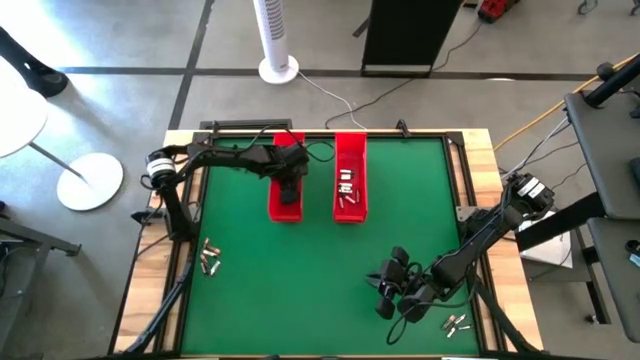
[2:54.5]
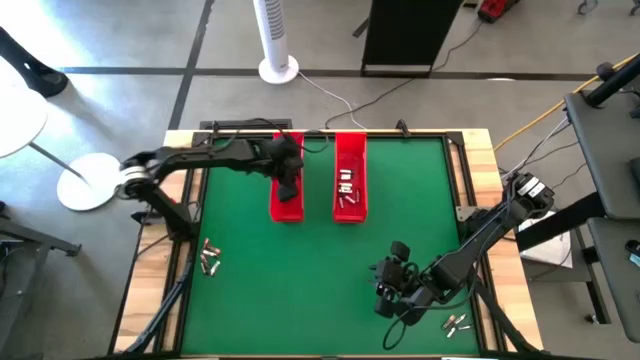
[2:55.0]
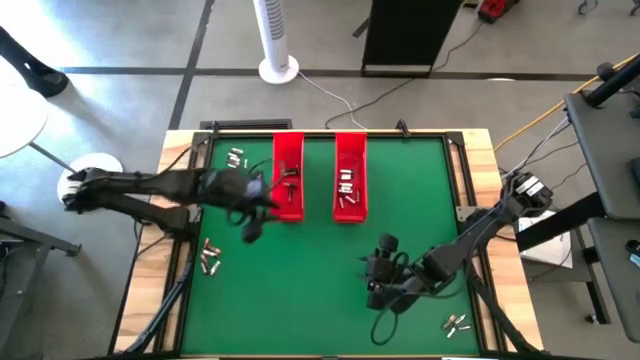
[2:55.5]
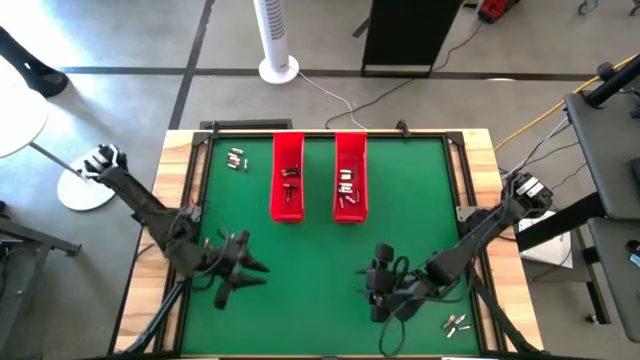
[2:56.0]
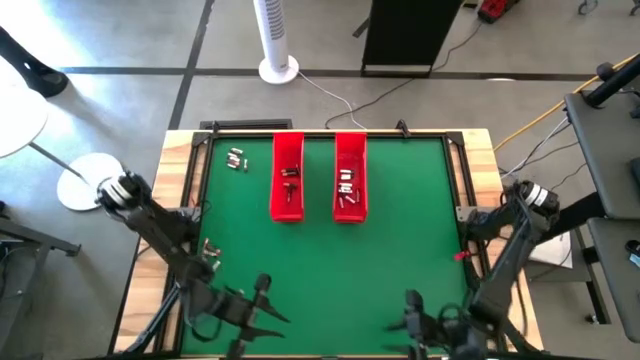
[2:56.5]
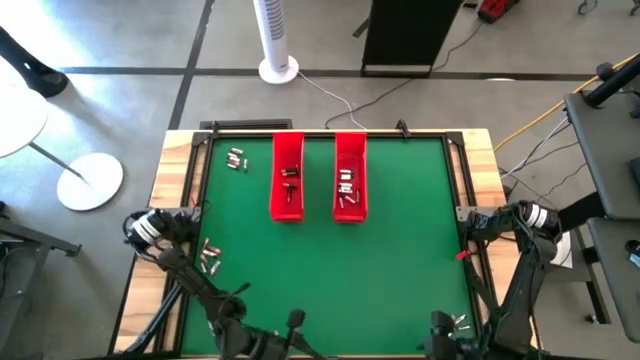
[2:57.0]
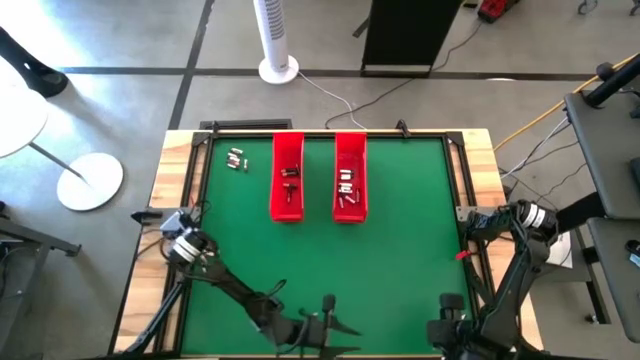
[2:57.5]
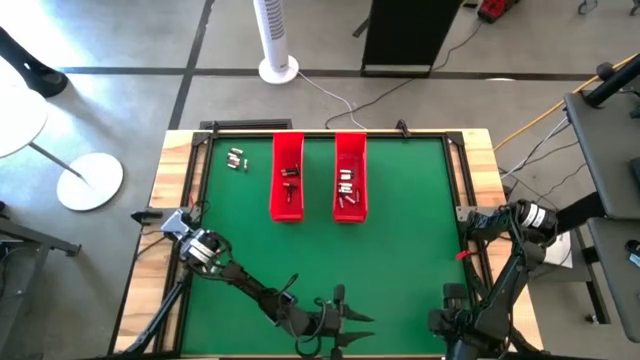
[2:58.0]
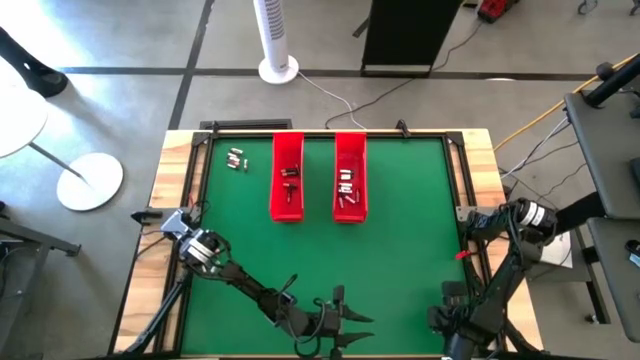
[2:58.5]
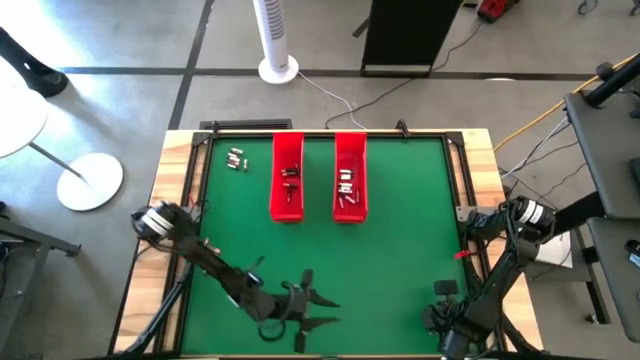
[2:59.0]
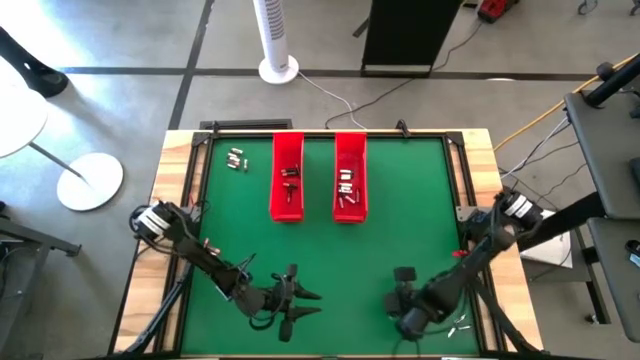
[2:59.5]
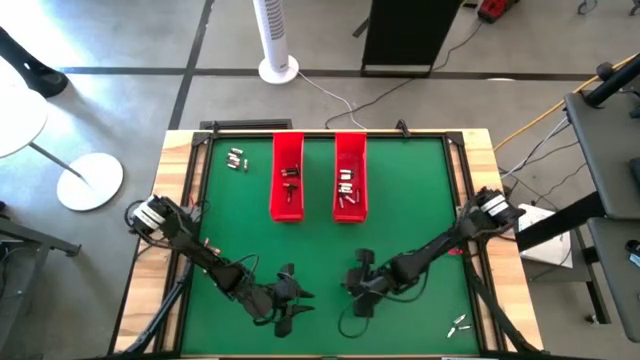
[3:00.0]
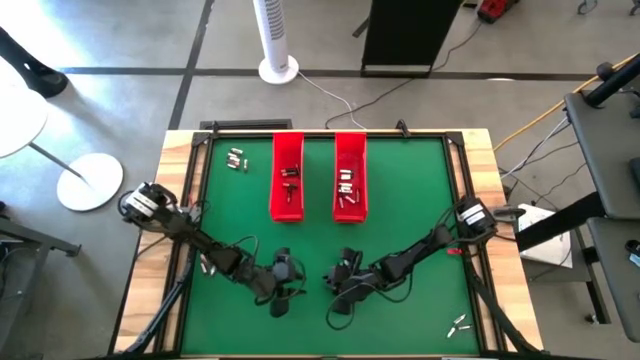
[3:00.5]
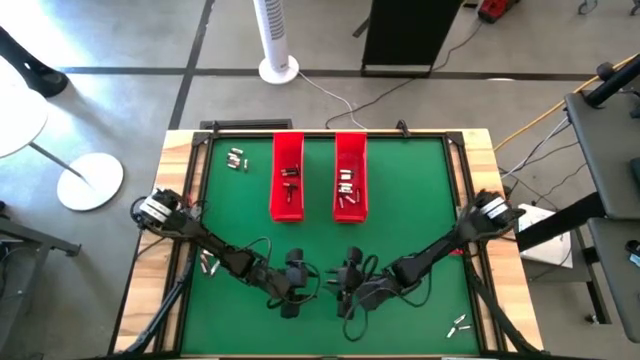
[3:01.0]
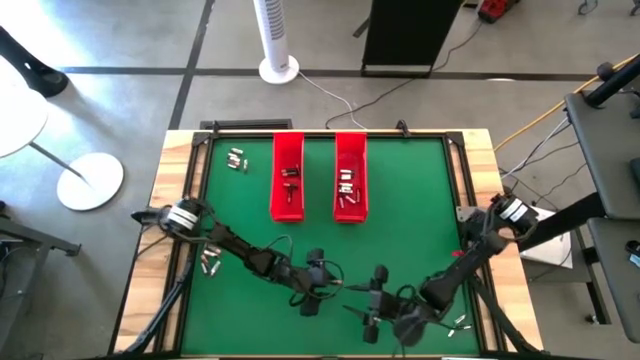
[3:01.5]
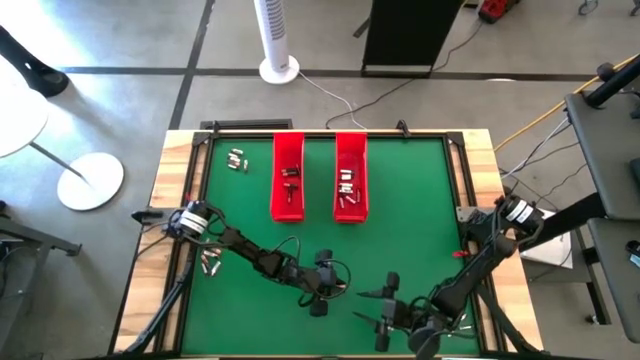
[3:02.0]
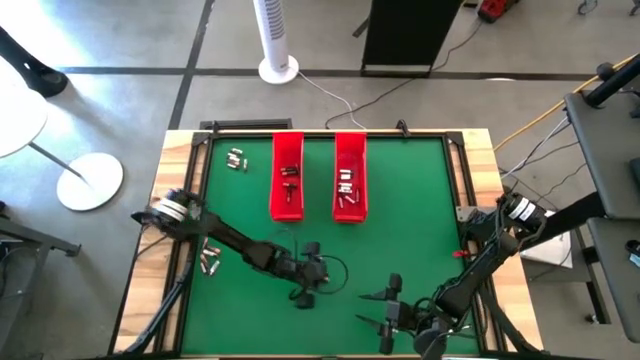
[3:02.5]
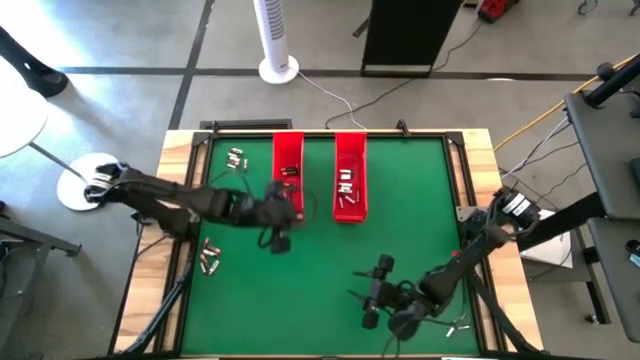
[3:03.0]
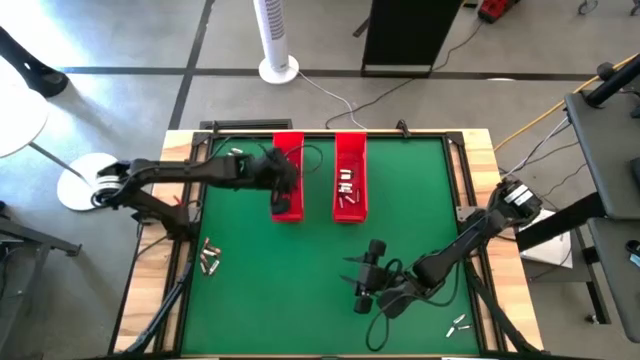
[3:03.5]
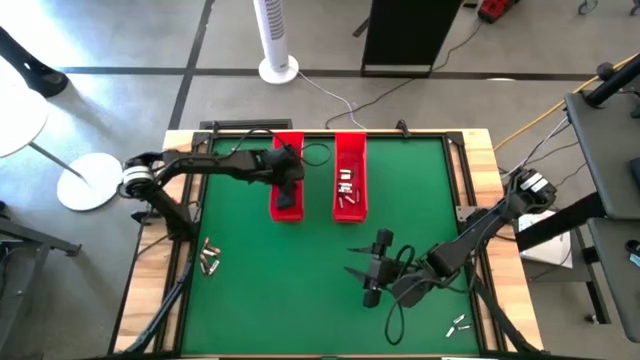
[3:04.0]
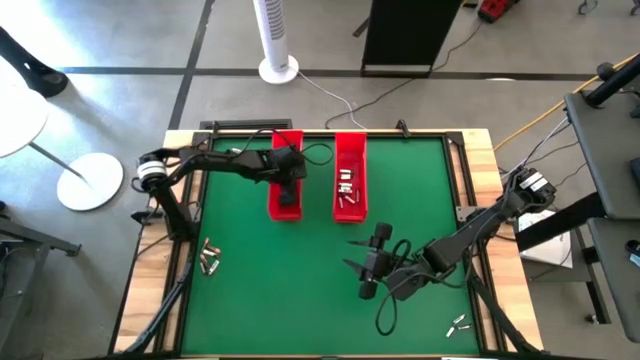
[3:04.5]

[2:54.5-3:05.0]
Task: Sort batteries
Put the black battery into the left red bin

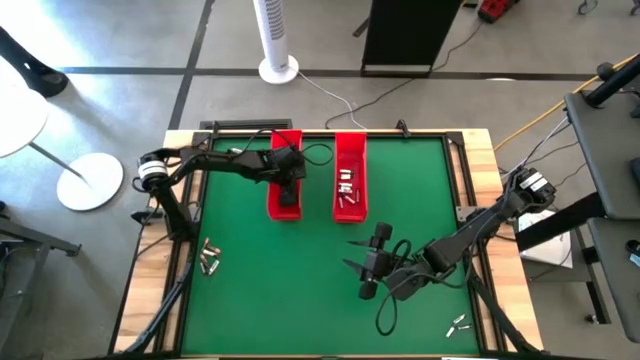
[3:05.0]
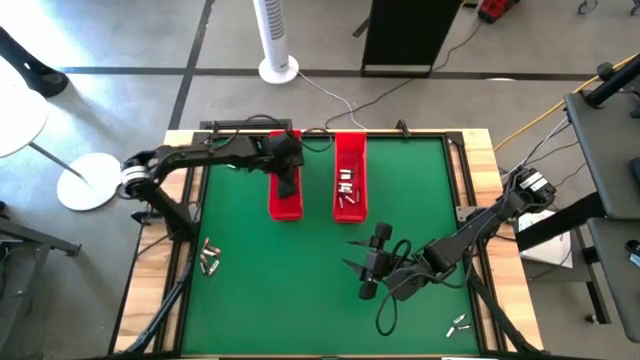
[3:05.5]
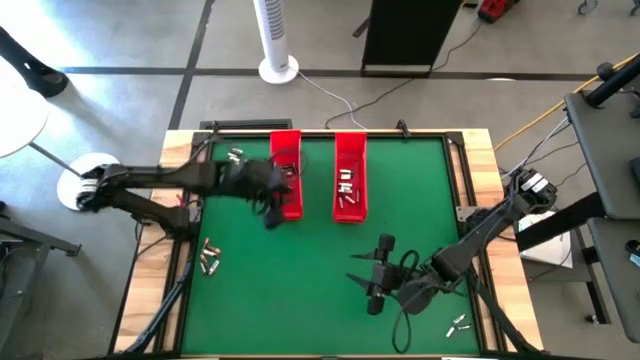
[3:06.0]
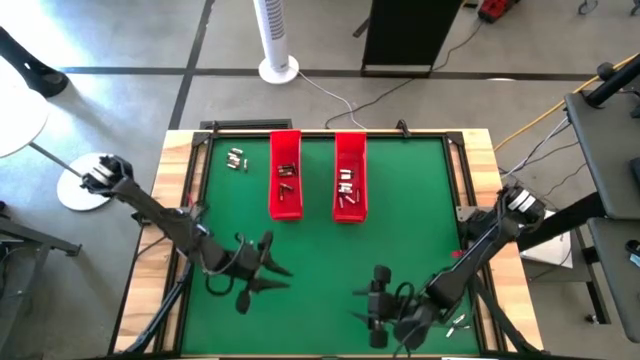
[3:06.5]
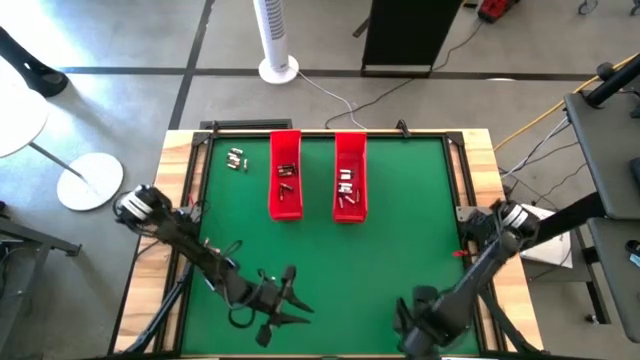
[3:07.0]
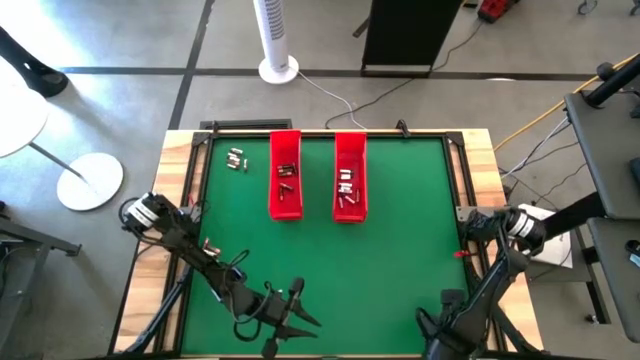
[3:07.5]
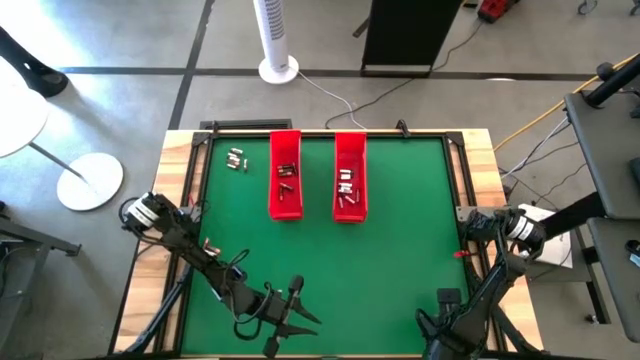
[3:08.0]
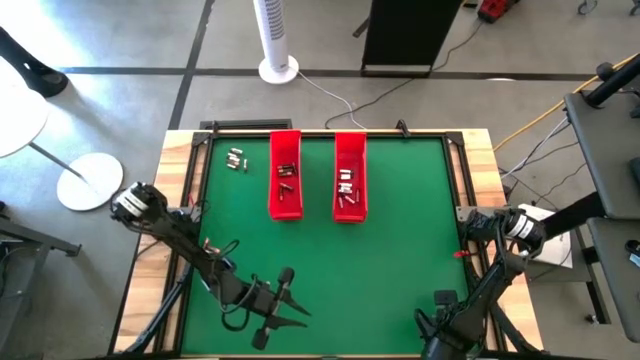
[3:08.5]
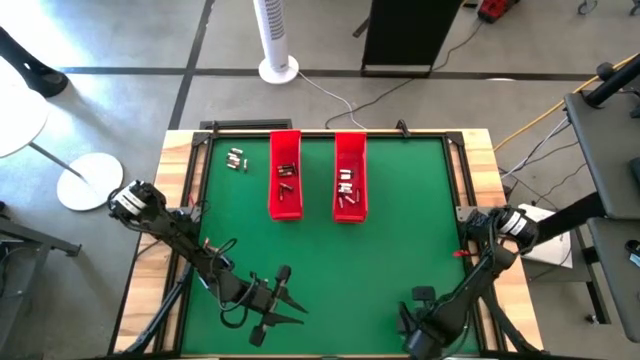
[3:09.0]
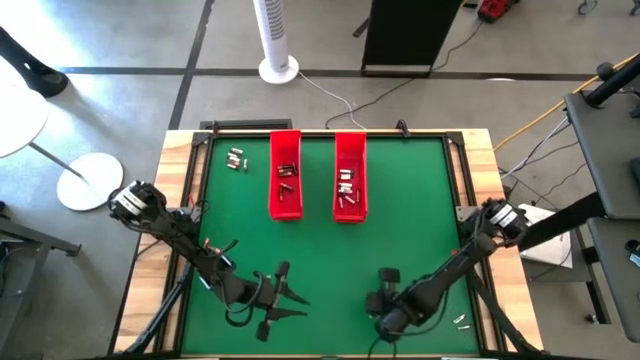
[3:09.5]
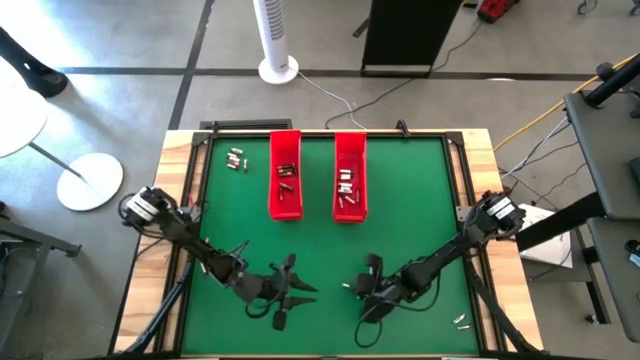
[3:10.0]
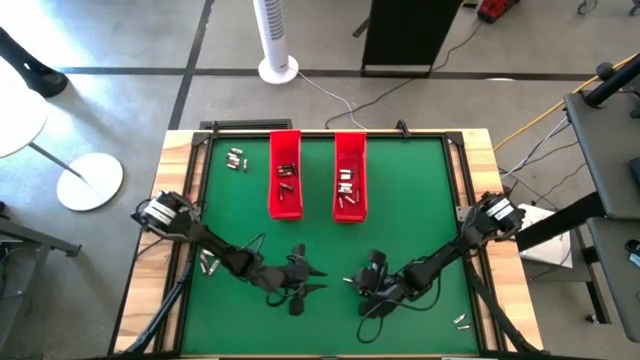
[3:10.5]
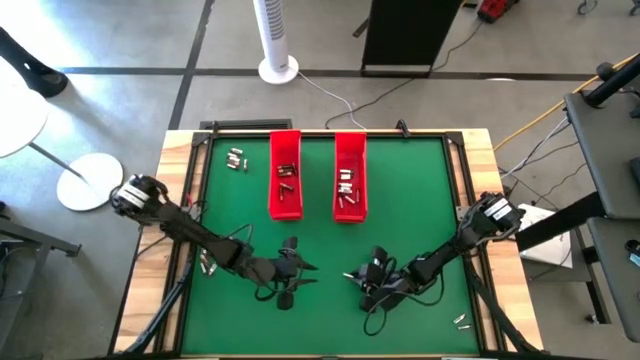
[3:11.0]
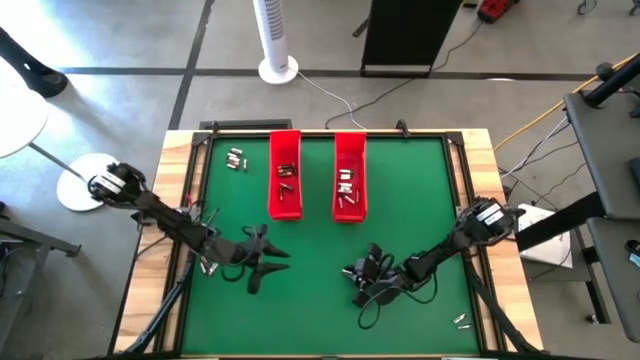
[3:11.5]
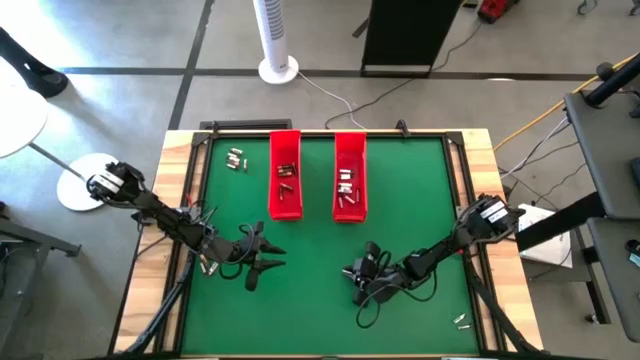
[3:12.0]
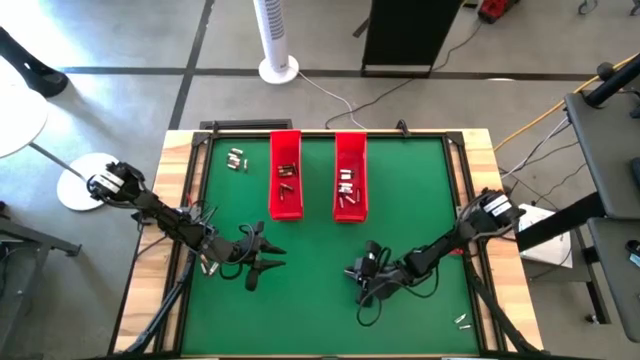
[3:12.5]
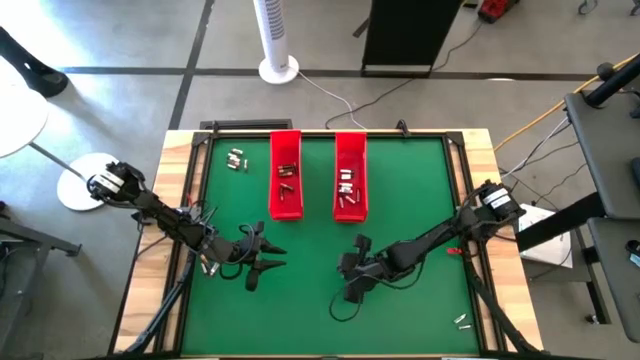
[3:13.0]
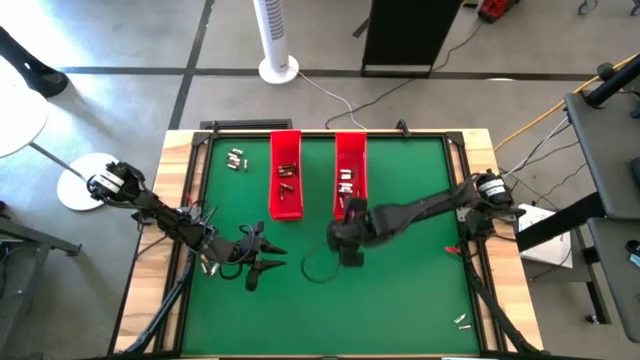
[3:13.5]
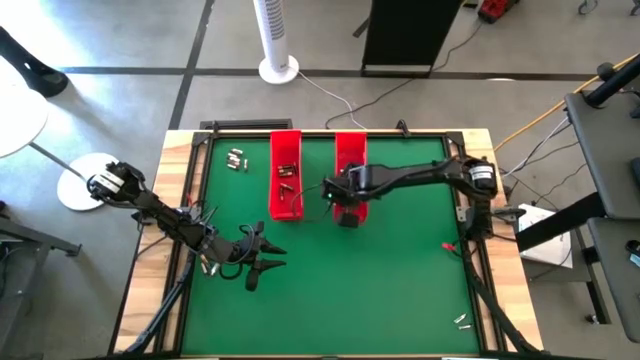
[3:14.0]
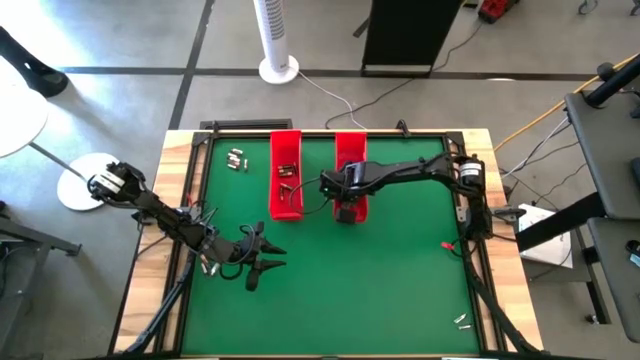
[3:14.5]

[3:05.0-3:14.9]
Put the silver battery into the right red bin
